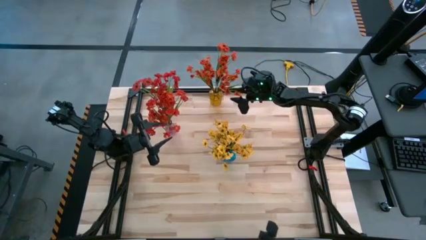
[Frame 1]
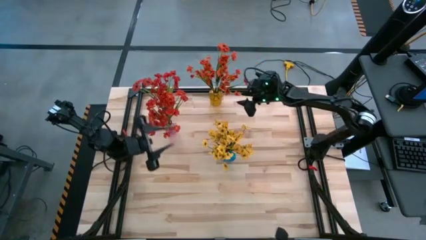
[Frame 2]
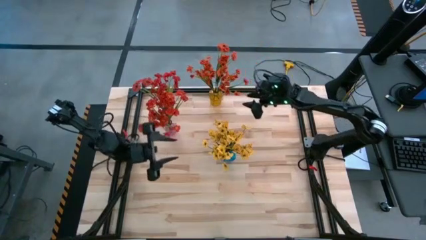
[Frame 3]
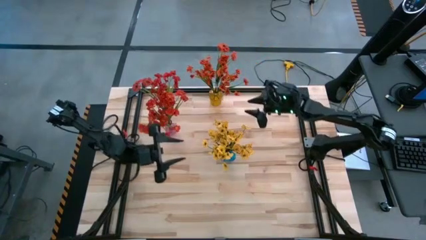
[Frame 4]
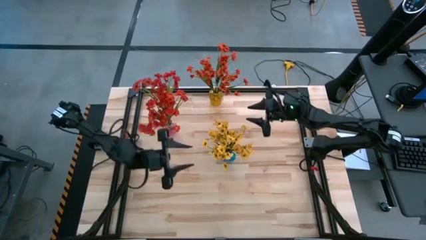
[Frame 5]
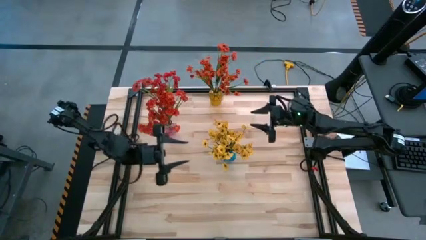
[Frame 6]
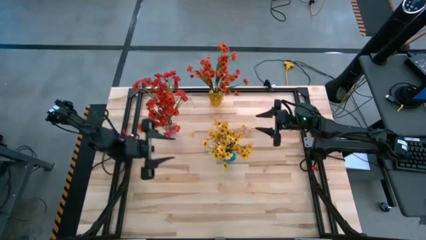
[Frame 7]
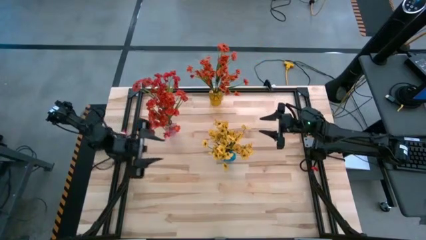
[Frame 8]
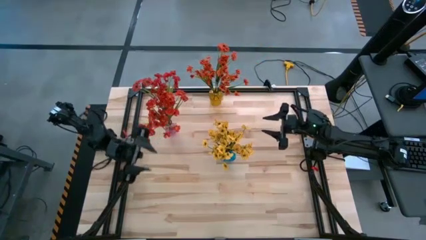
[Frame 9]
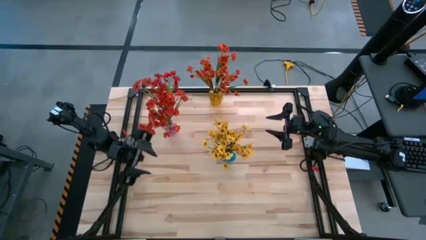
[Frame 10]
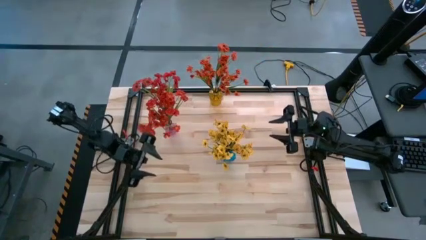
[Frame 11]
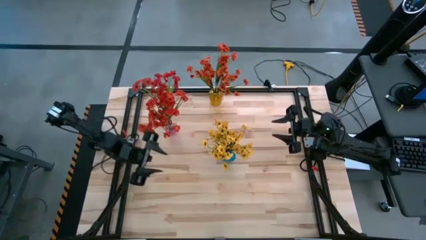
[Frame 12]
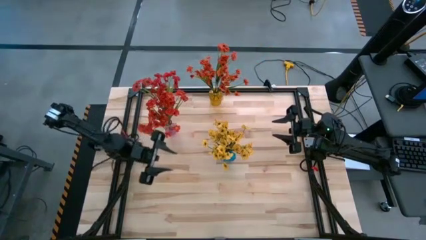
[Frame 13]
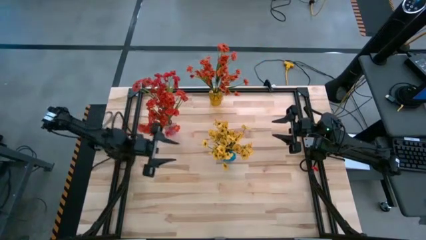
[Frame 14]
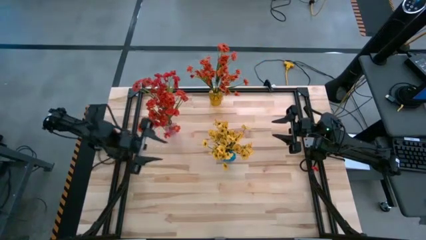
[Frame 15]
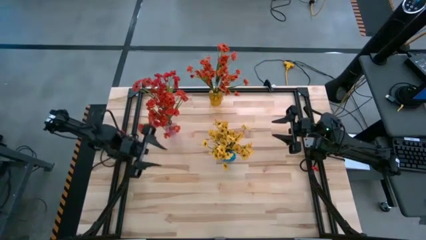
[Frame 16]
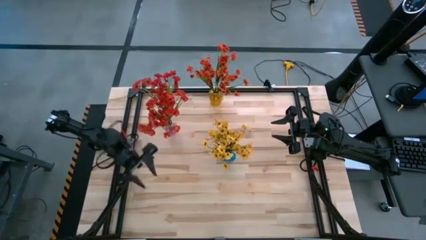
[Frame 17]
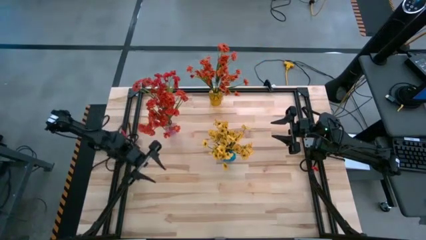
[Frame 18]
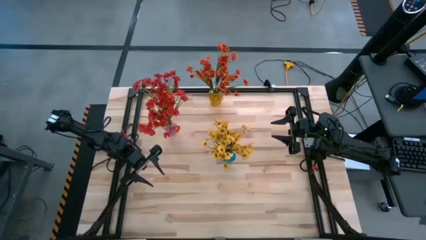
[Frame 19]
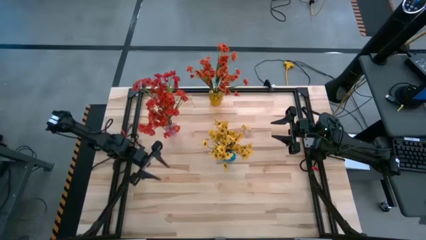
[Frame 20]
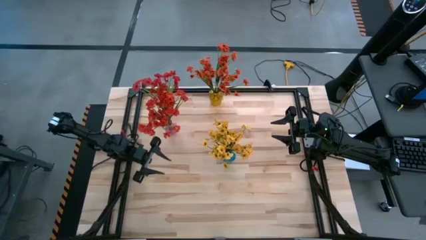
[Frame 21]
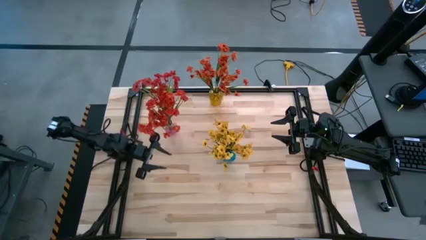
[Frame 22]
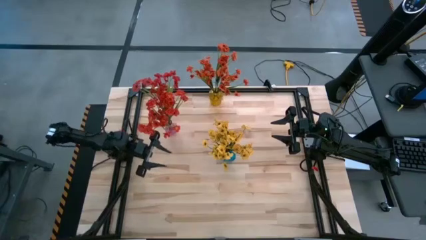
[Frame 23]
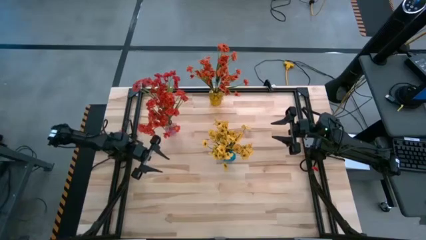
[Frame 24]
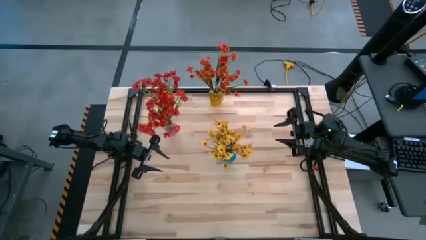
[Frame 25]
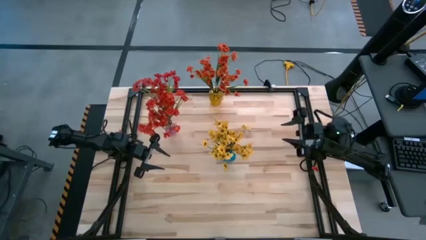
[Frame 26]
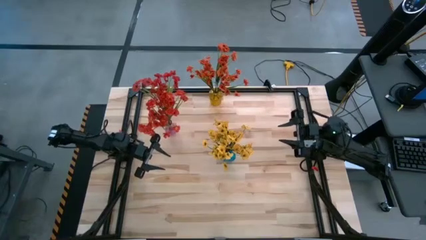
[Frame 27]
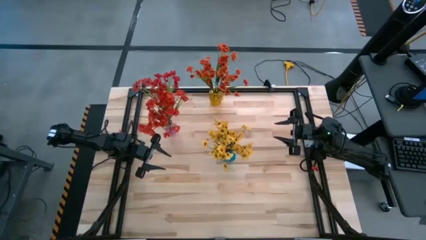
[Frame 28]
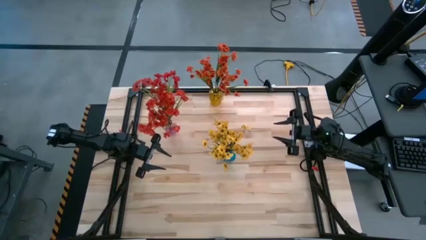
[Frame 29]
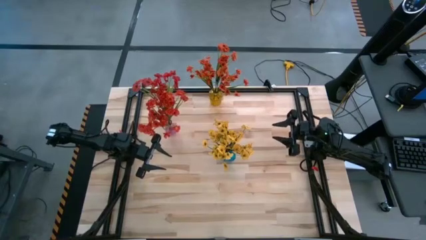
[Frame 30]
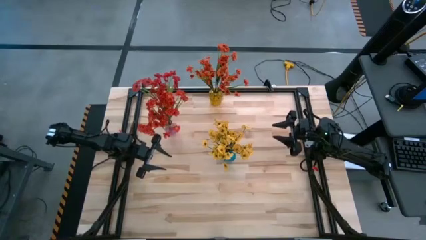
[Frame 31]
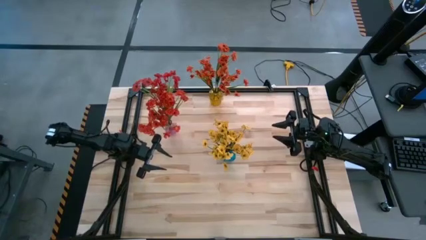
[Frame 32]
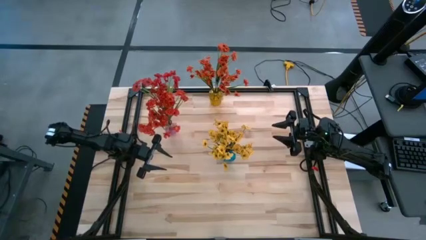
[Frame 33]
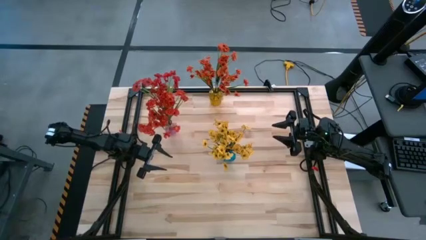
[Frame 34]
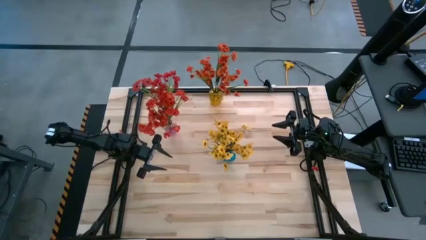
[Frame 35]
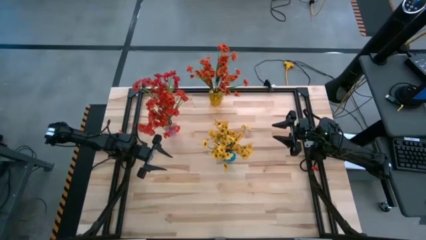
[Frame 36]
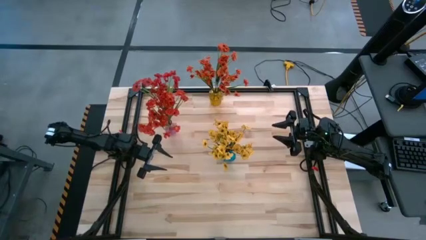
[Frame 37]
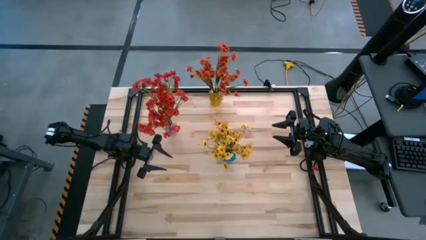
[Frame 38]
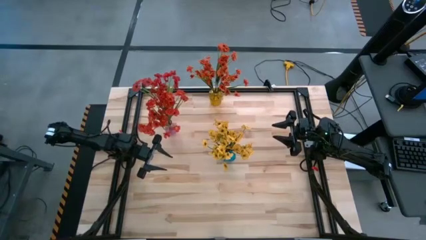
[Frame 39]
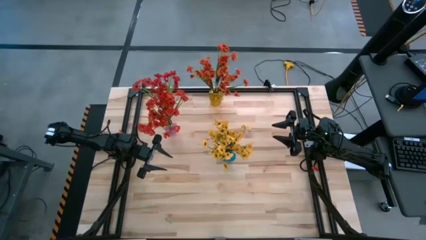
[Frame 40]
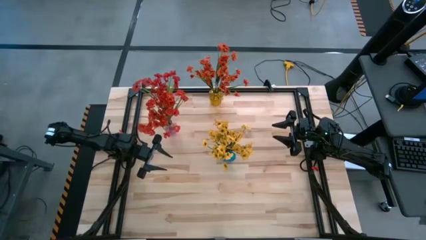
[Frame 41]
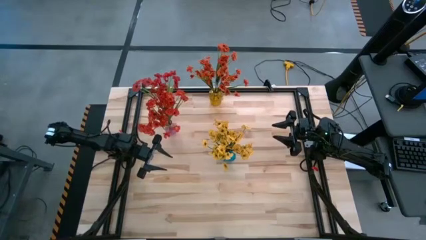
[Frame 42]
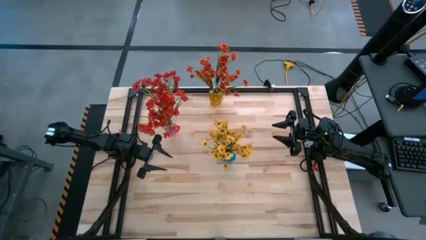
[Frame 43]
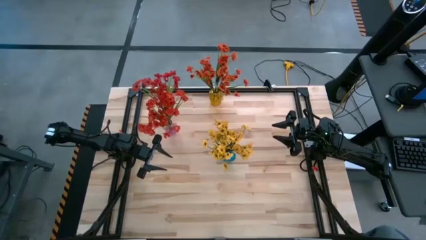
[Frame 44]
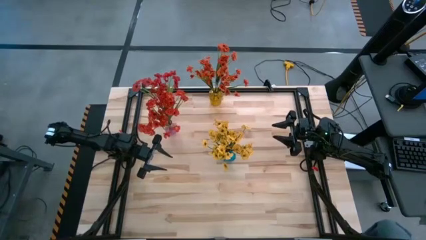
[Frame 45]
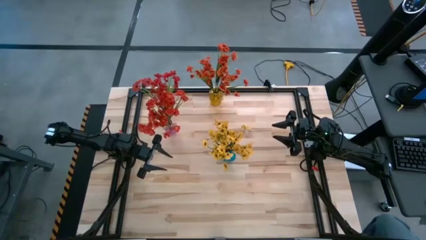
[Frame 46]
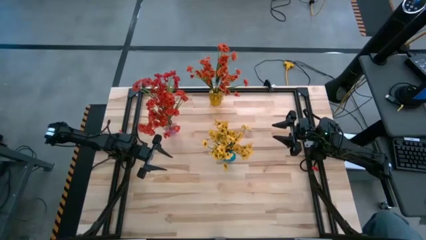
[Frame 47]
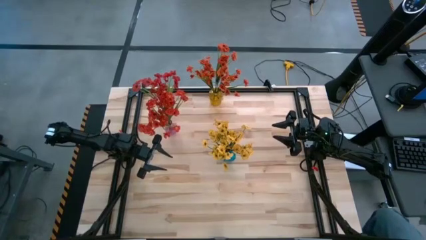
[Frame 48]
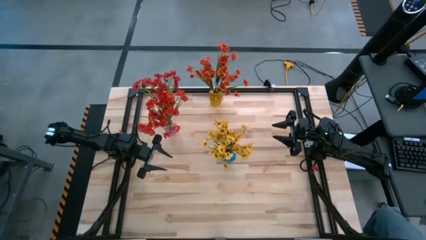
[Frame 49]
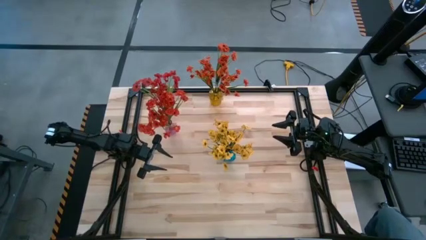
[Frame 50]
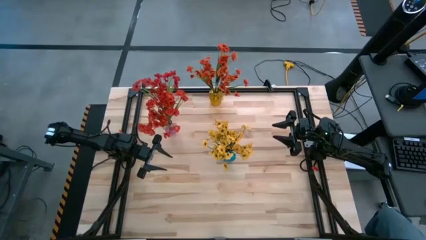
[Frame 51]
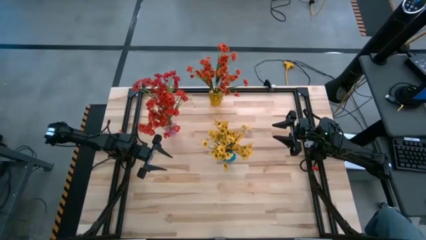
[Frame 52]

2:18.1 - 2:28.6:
Task: Sort flowers into vase by color
Return to Home Position

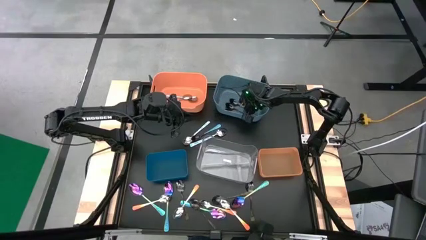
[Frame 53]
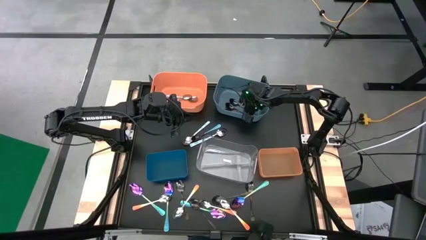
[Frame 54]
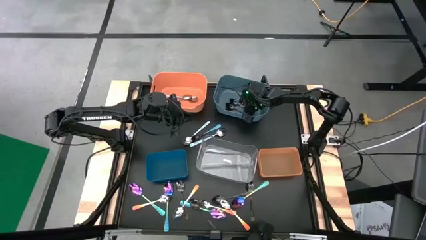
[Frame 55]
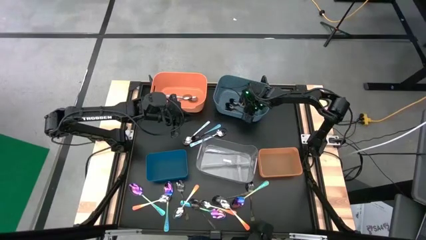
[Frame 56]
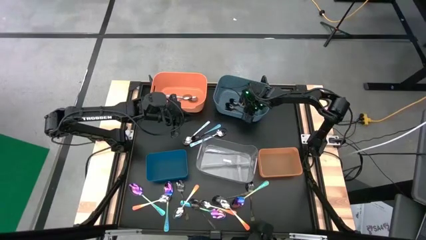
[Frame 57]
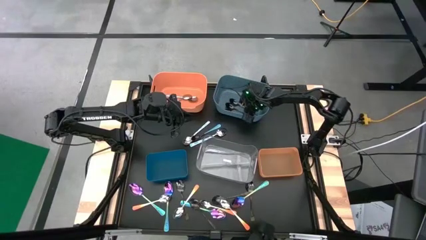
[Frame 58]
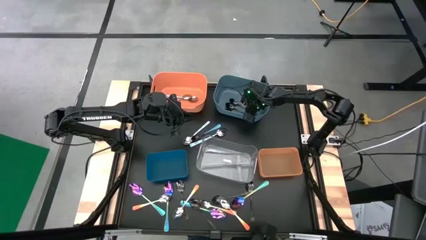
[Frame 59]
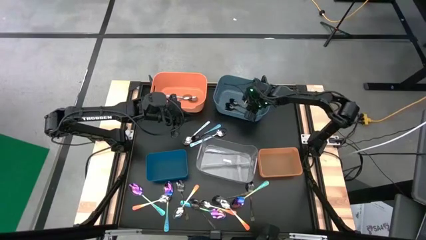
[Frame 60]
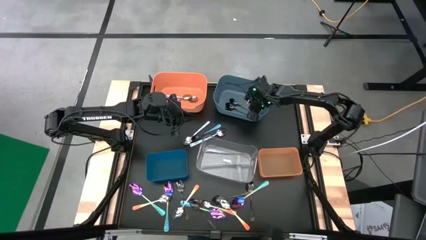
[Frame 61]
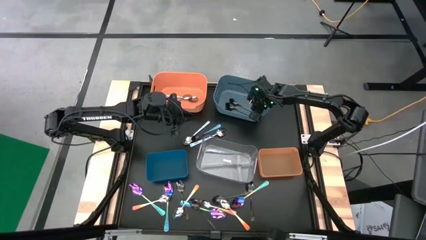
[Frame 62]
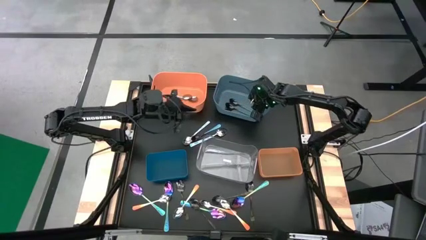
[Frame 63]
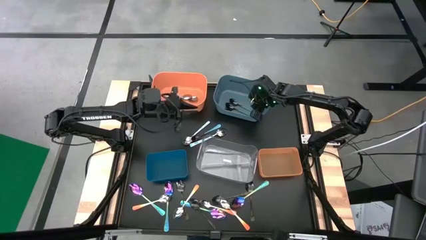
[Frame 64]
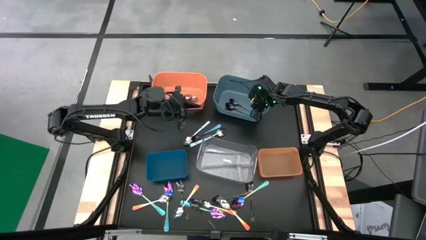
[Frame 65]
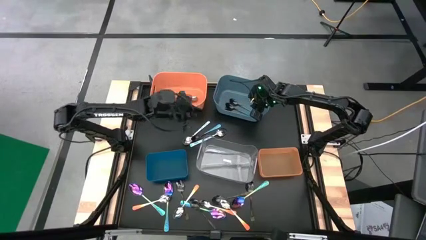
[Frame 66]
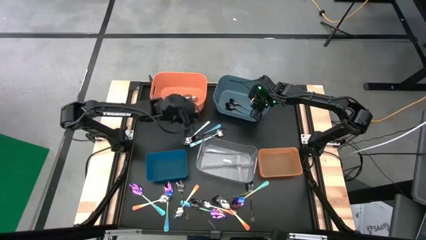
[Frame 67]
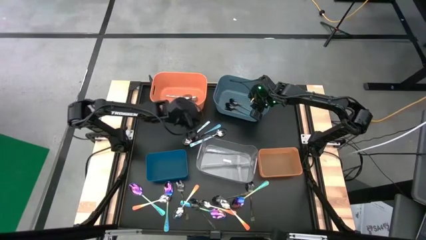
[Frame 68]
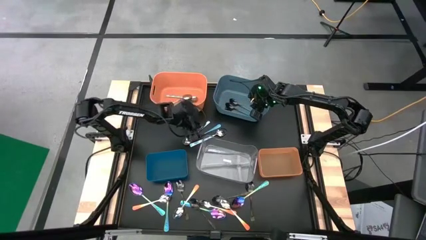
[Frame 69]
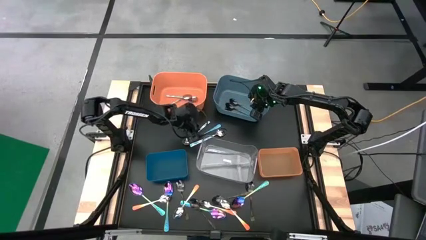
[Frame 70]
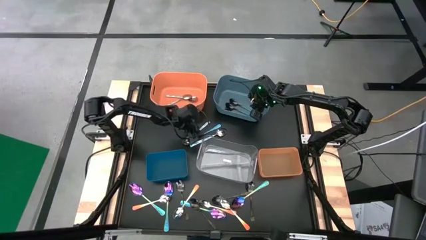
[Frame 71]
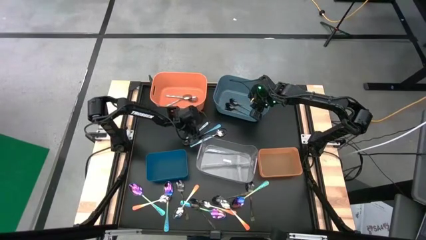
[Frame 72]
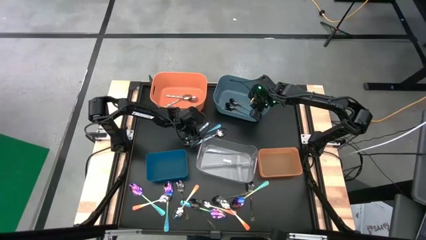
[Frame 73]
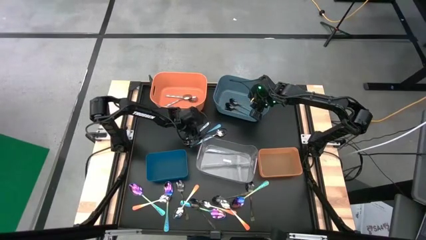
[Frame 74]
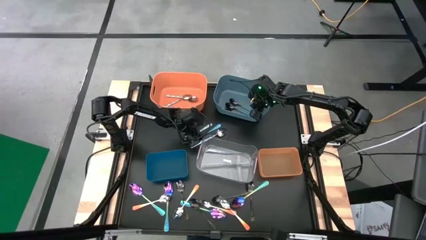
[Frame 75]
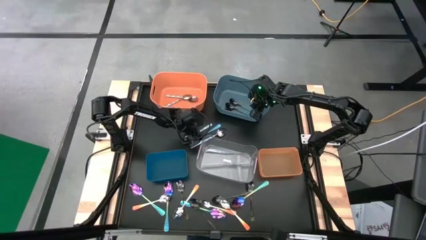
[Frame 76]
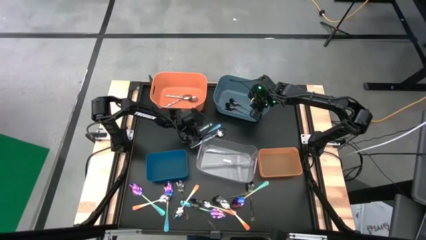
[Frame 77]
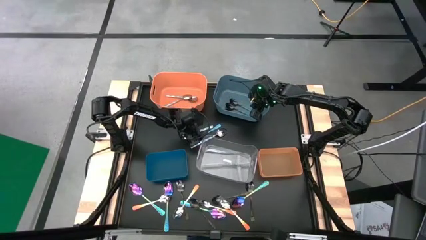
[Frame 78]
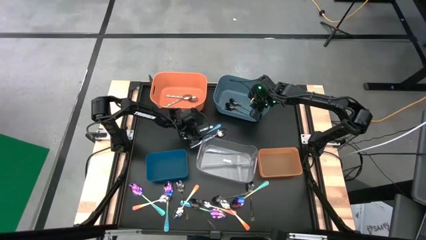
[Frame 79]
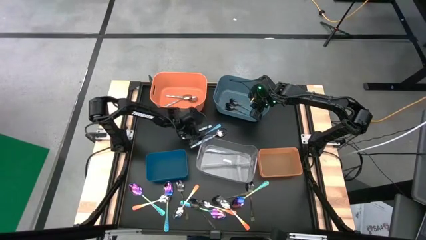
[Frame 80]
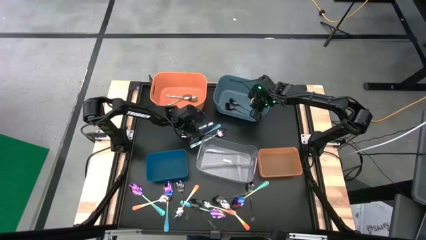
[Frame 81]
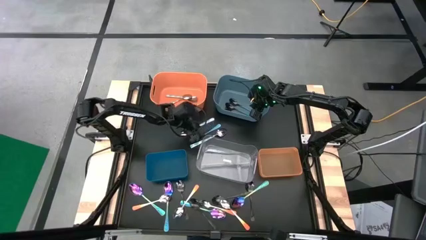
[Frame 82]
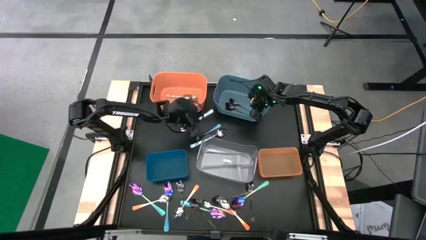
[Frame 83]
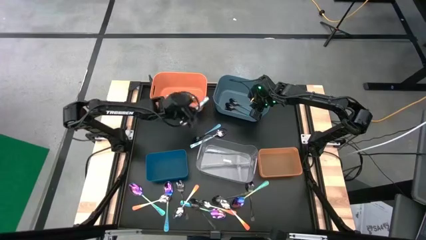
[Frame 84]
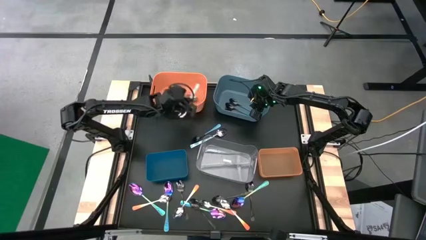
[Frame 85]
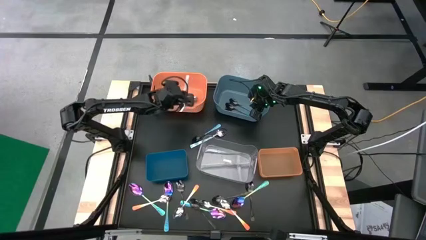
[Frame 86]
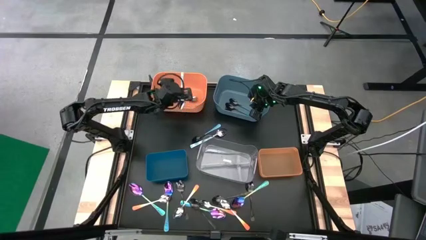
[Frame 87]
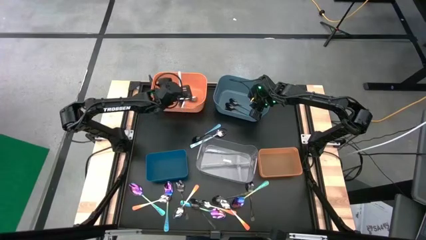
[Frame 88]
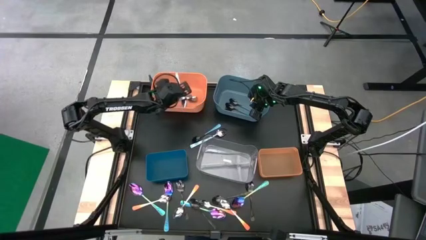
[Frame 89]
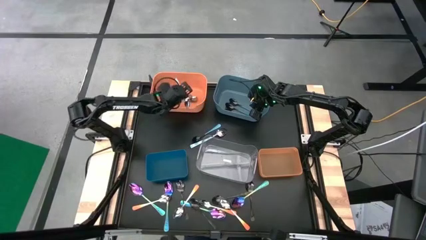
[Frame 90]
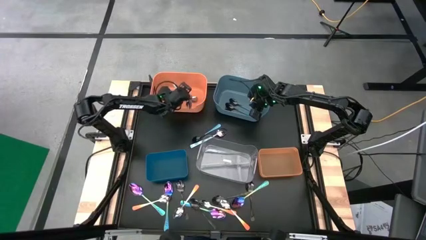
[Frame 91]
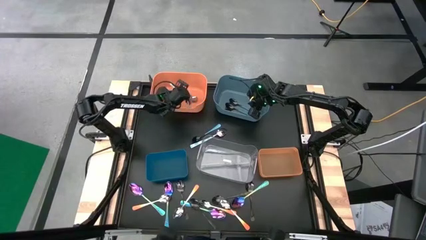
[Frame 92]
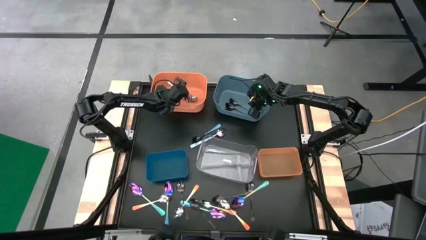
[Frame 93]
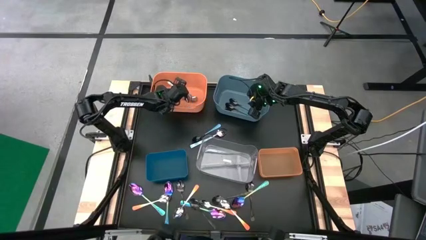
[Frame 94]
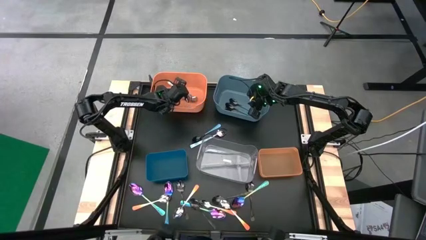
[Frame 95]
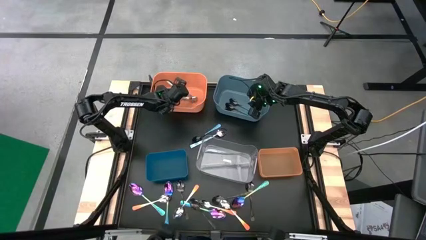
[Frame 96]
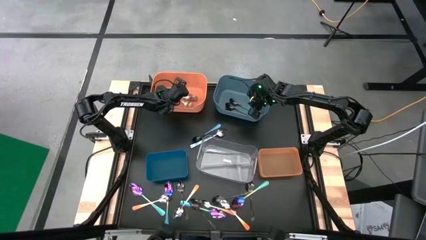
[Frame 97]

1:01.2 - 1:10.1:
Task: Sort silverware by color (type)
Put the white patterned spoon into the orange bin
